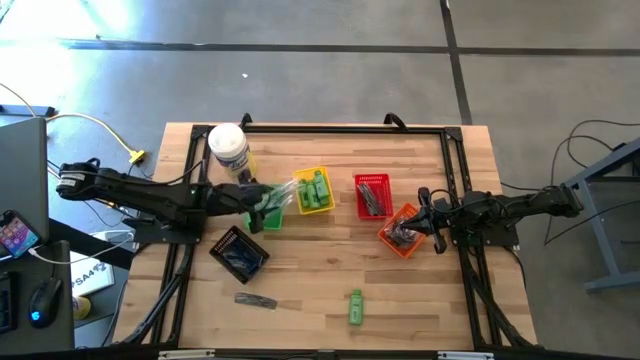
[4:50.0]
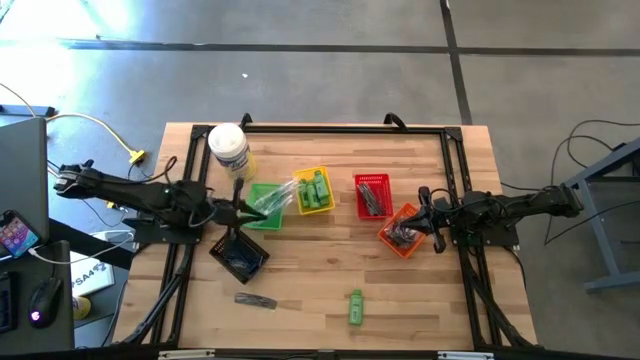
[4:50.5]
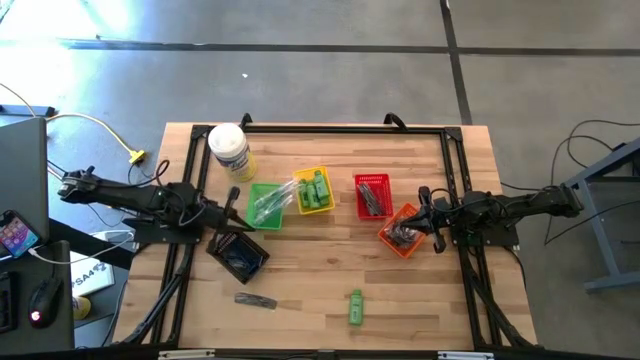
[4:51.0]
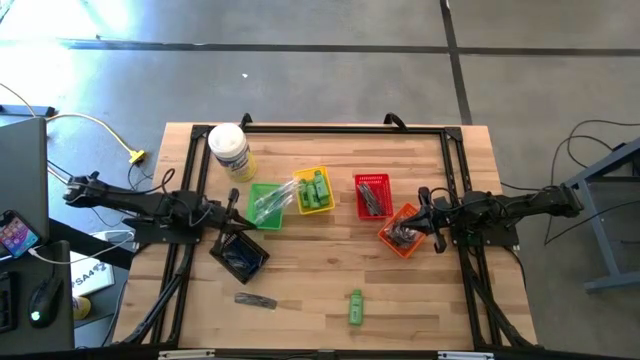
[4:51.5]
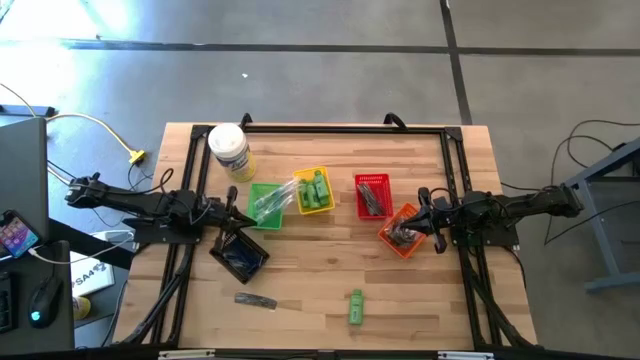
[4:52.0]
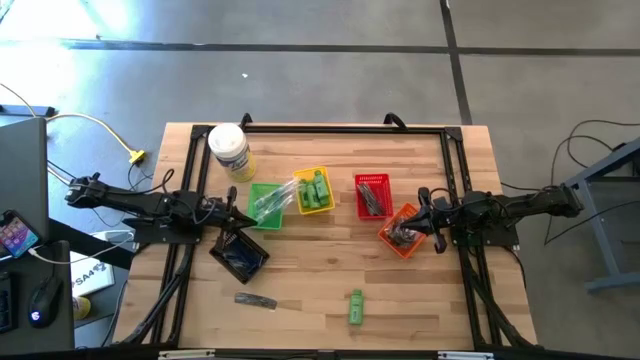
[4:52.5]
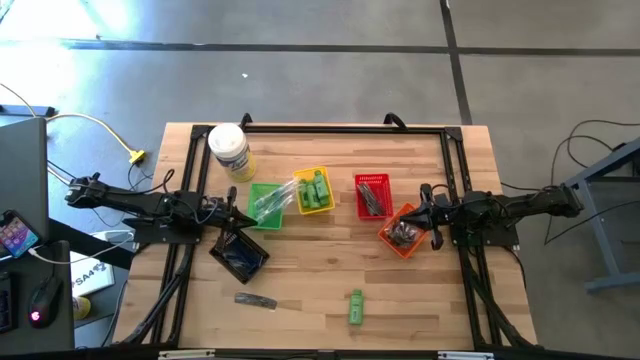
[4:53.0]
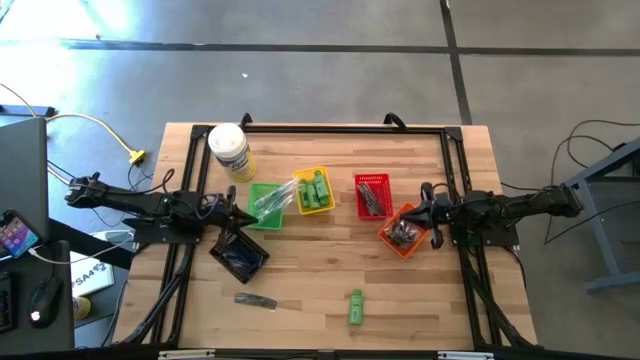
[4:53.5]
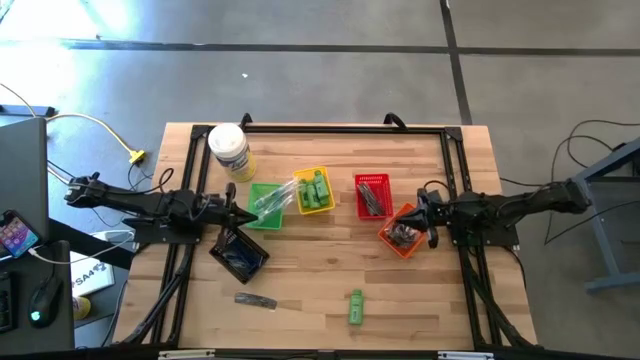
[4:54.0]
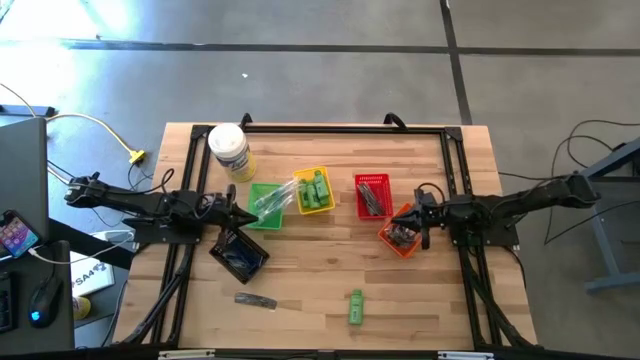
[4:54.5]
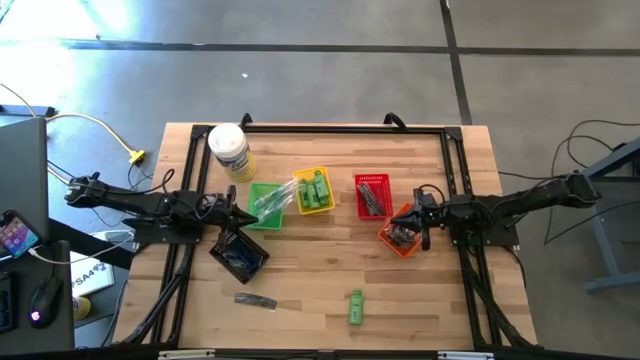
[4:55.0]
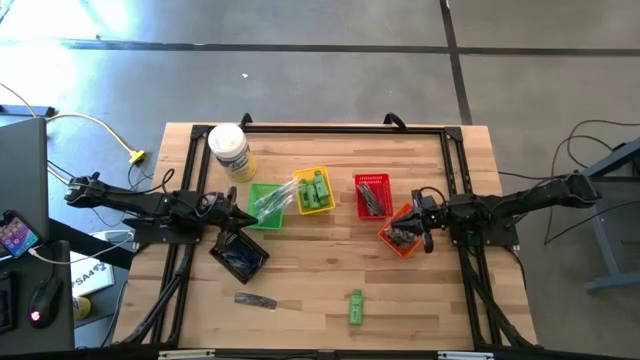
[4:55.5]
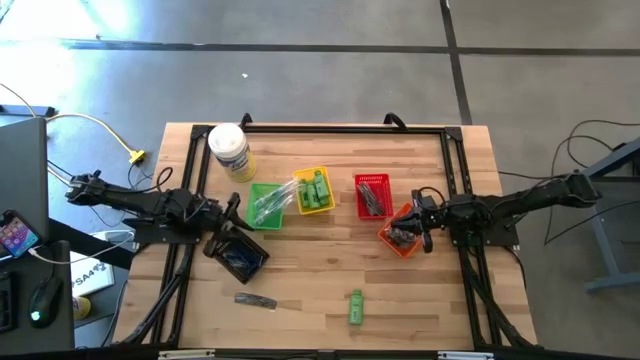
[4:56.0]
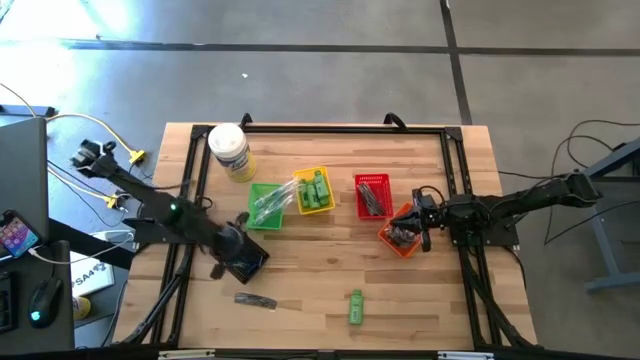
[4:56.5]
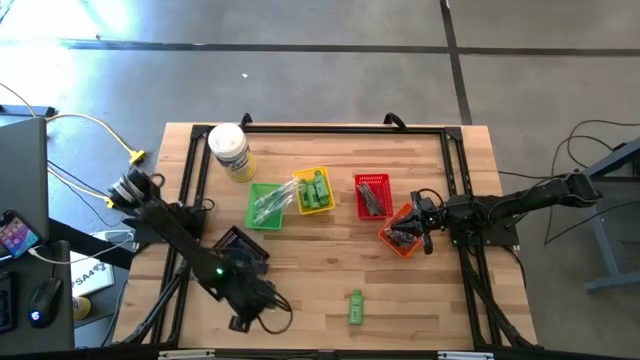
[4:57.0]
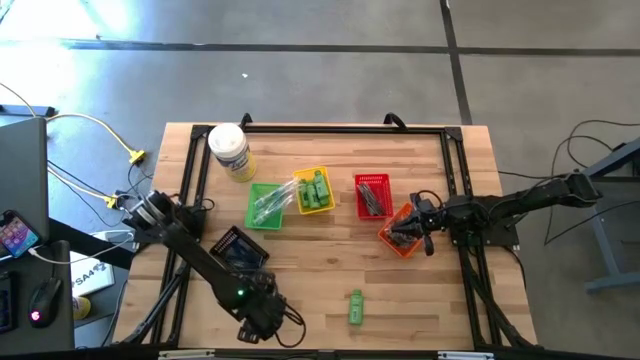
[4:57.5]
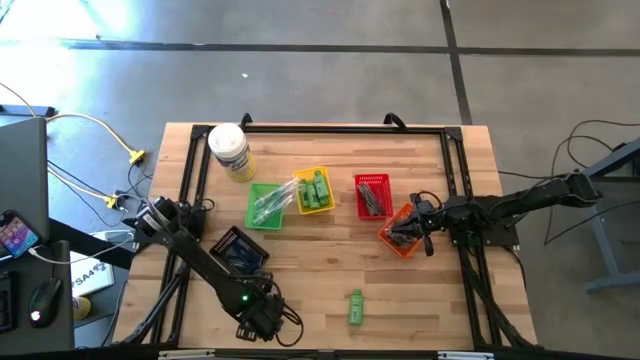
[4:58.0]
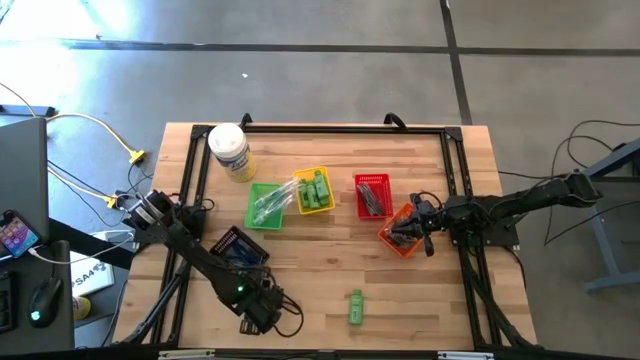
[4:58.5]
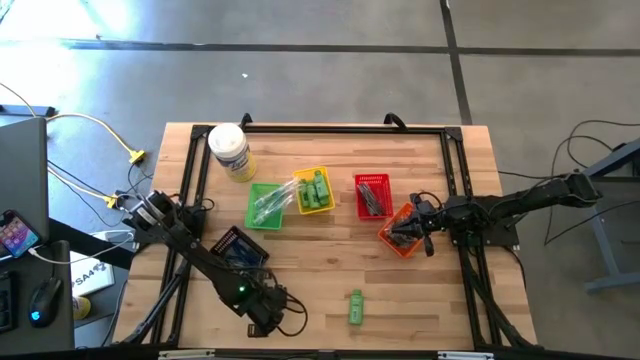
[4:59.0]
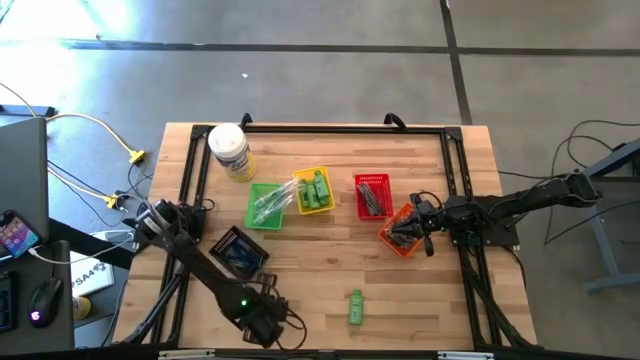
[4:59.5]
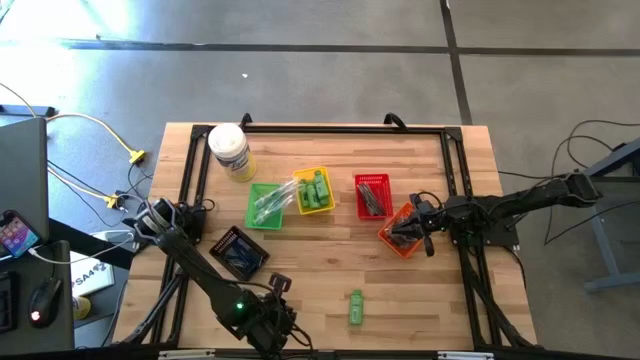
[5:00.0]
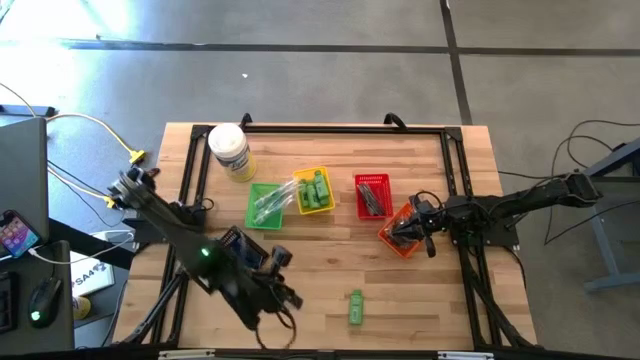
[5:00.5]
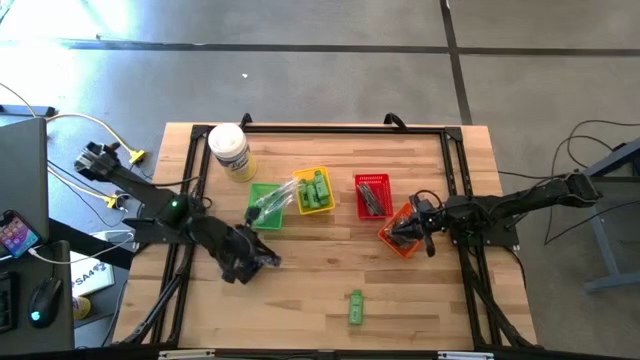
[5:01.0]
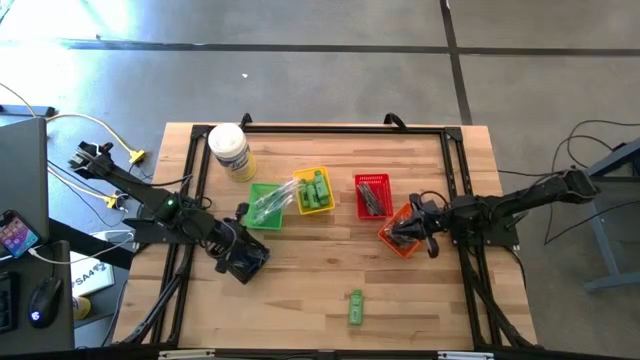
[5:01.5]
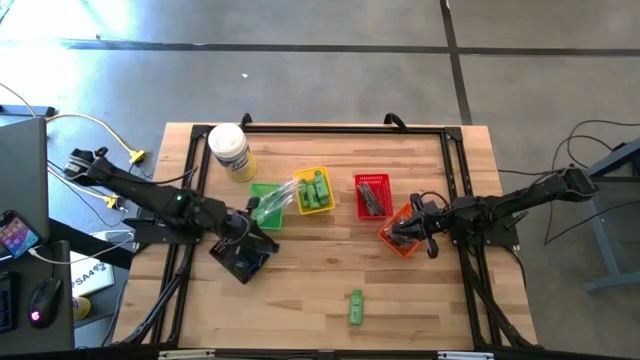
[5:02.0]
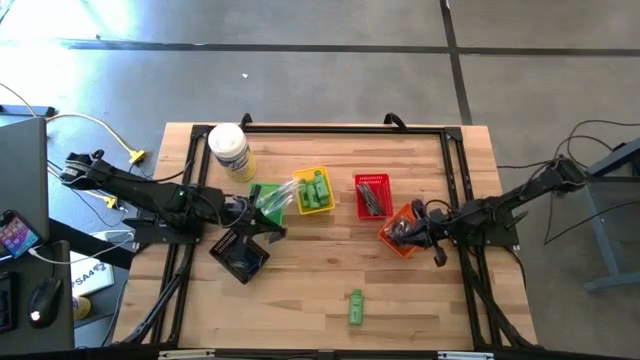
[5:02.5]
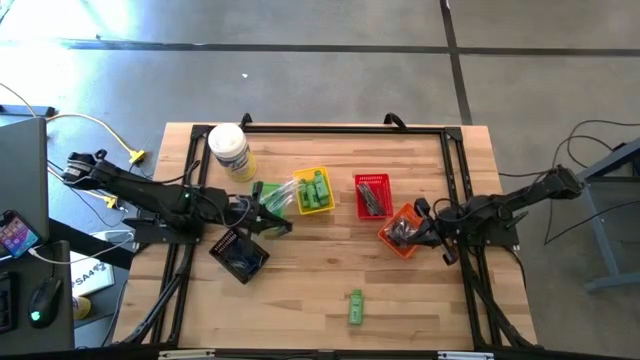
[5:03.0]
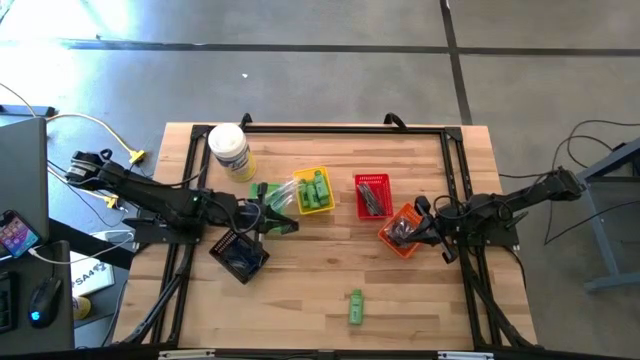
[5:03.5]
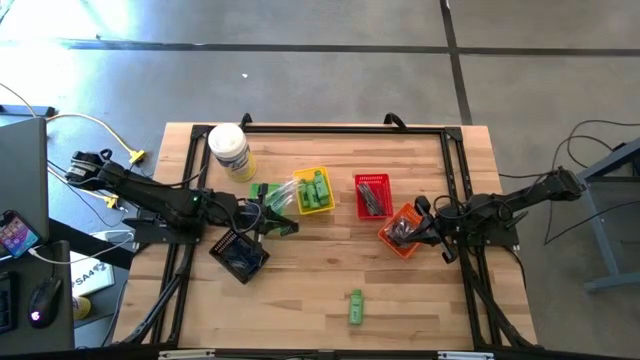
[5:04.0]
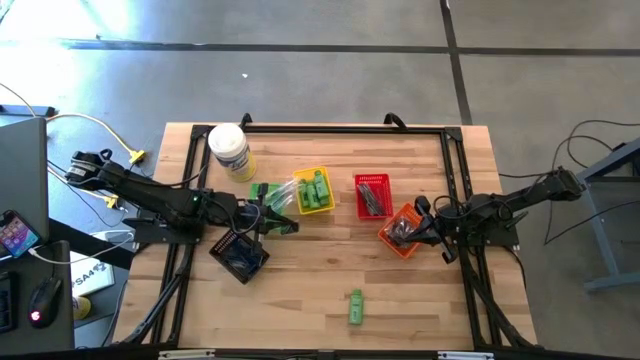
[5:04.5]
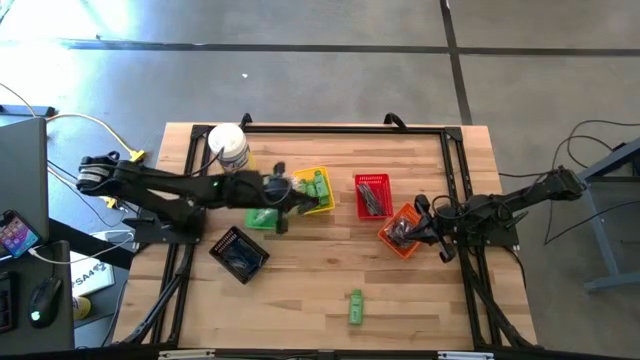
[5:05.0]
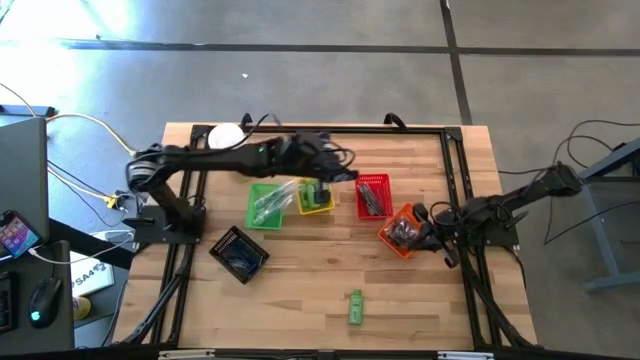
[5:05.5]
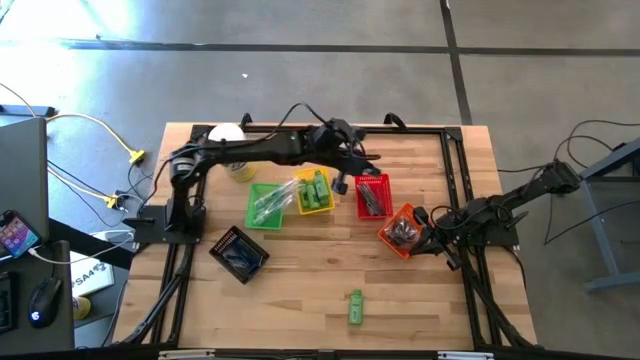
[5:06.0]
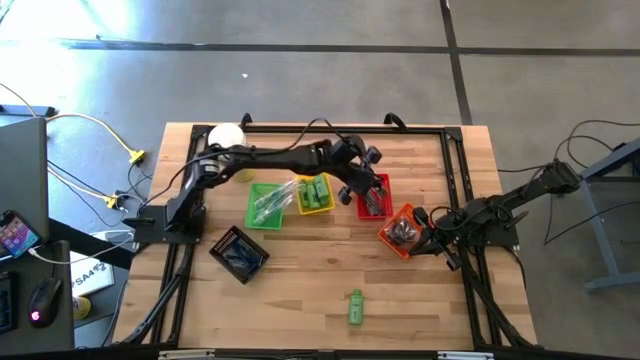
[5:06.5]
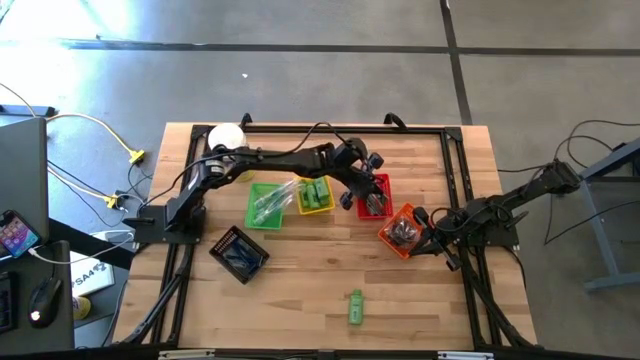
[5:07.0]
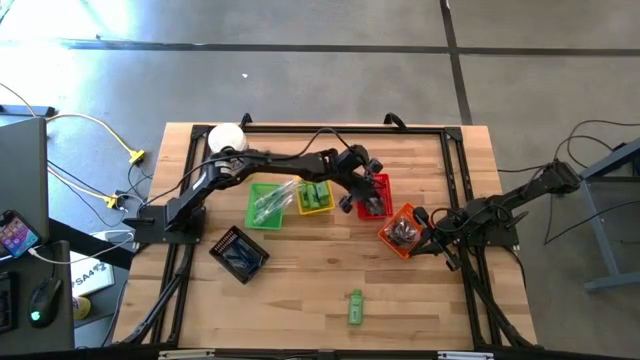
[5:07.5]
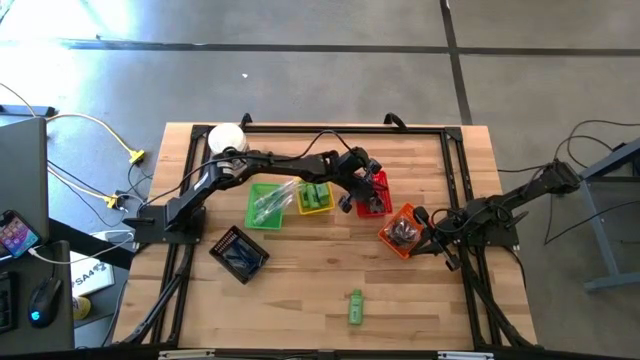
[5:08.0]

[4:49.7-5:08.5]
Task: Pick & Place Travel size toiletries
Put the black comb into the red basket

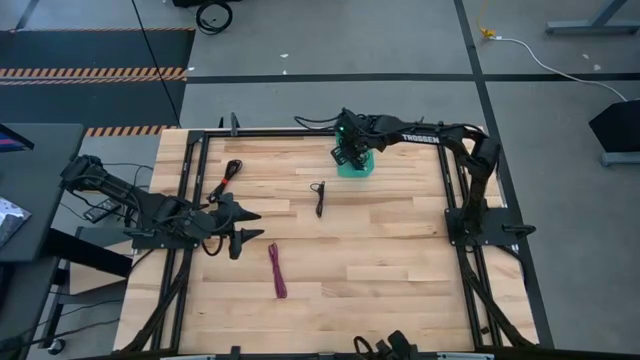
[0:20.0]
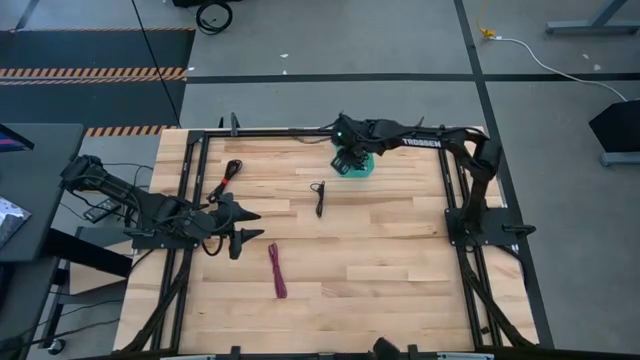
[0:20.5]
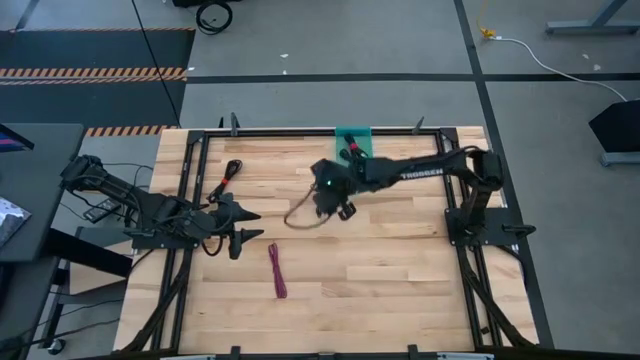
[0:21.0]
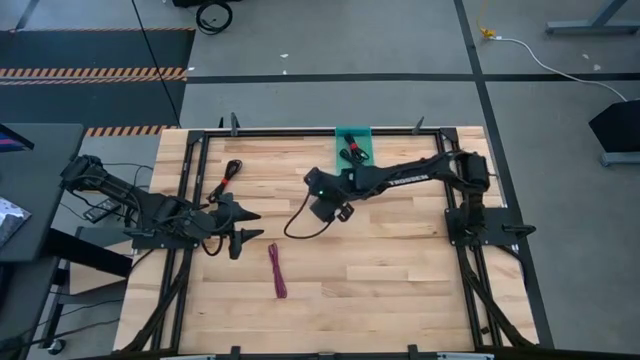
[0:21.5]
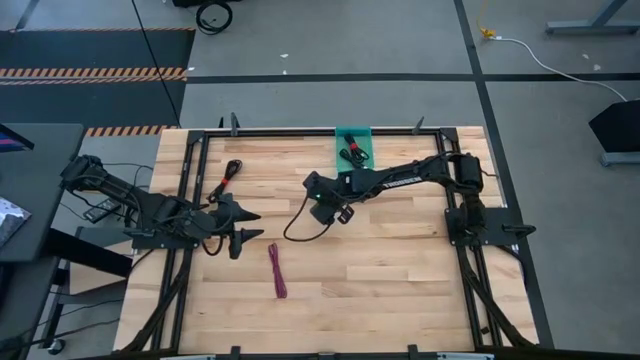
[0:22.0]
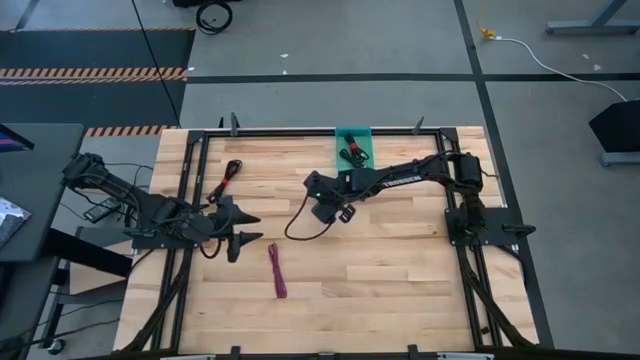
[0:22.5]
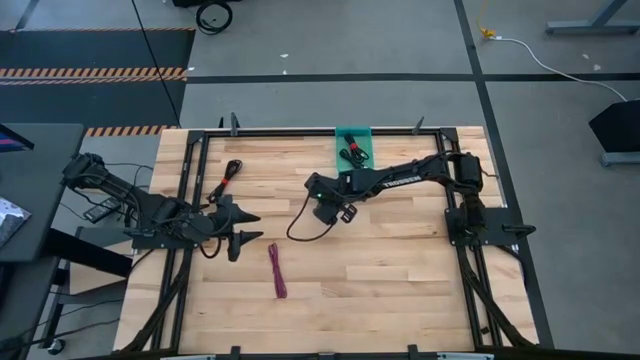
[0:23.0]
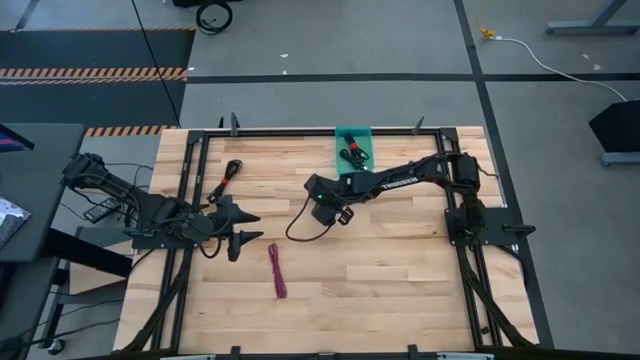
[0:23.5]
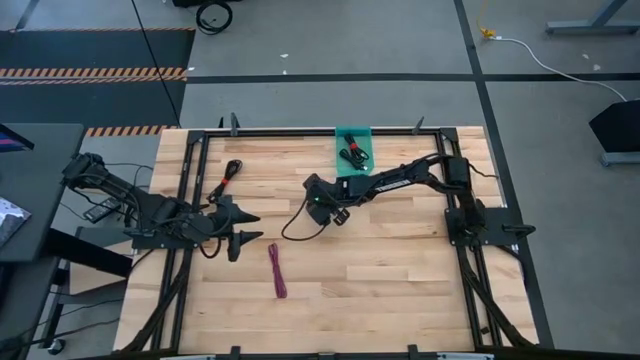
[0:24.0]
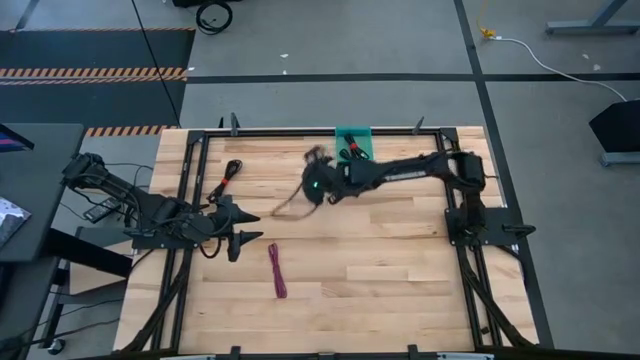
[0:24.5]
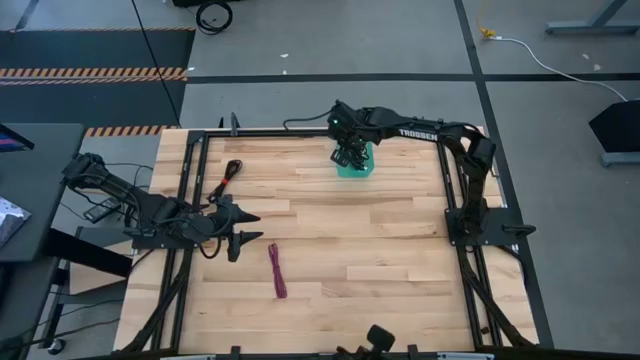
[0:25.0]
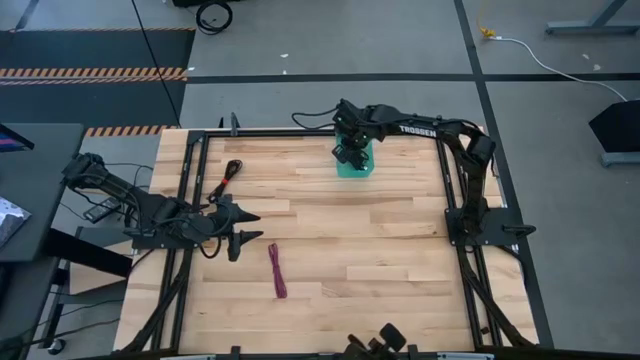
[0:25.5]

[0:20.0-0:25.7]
Task: Pick and place USB-C Cables
Put the black charger cable into the green bin
